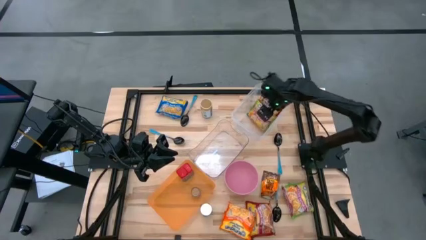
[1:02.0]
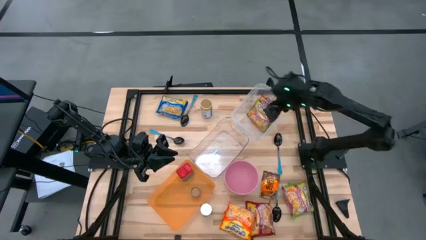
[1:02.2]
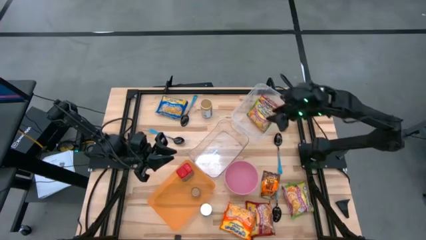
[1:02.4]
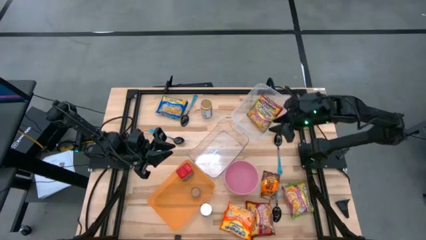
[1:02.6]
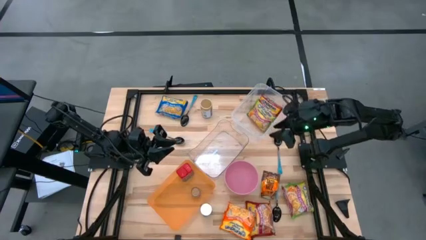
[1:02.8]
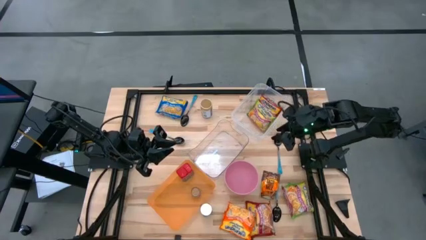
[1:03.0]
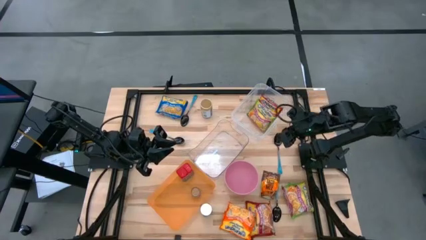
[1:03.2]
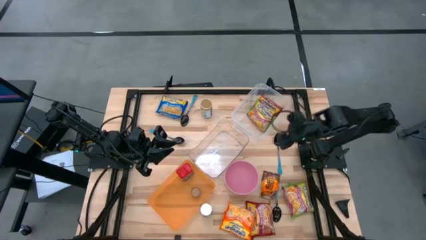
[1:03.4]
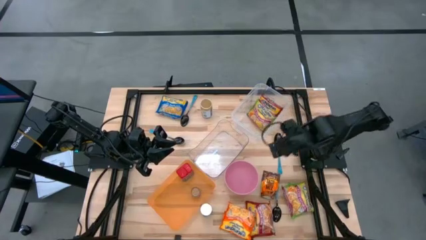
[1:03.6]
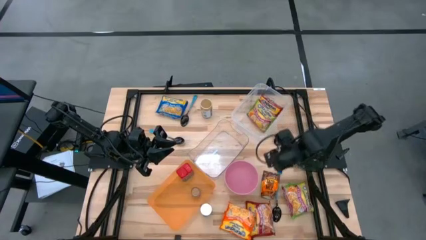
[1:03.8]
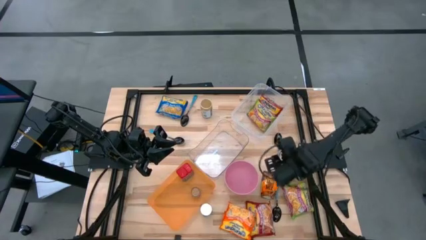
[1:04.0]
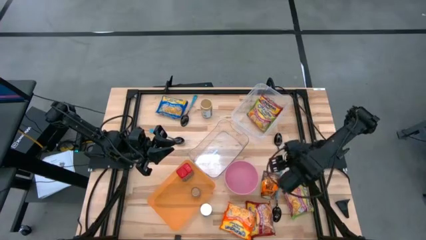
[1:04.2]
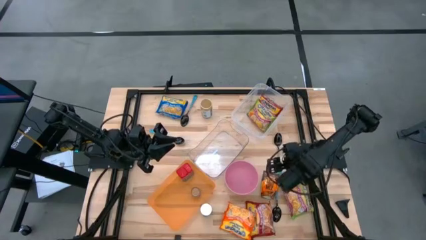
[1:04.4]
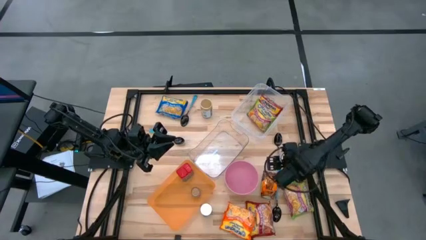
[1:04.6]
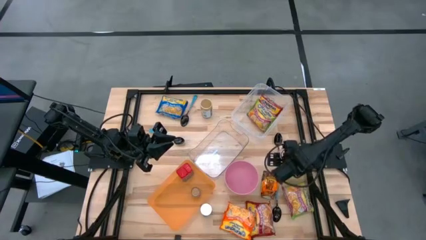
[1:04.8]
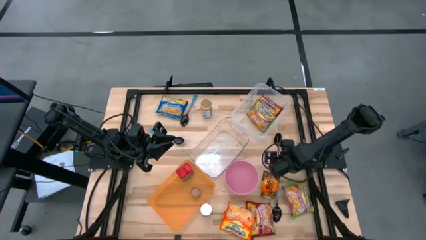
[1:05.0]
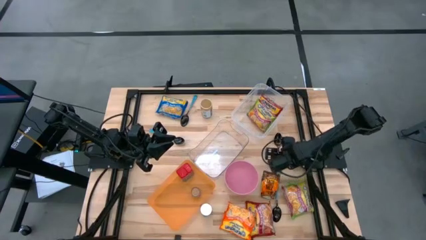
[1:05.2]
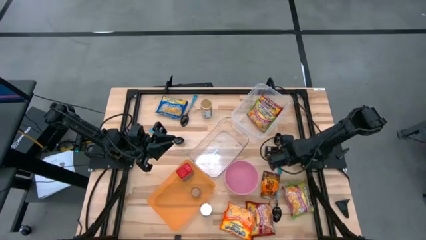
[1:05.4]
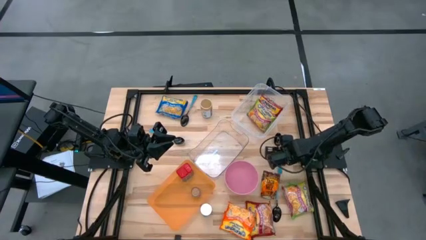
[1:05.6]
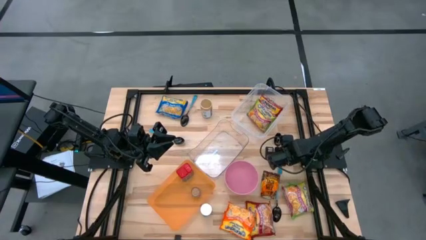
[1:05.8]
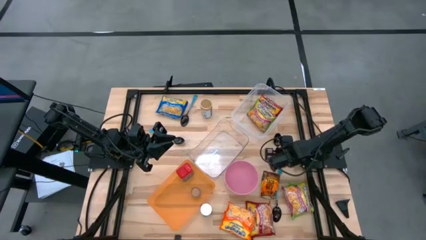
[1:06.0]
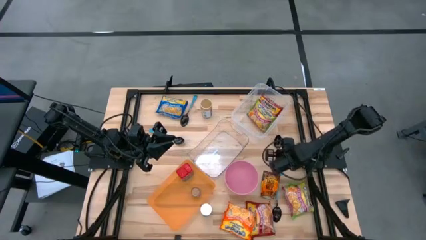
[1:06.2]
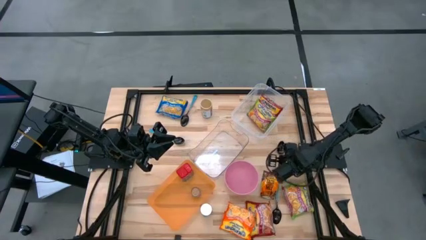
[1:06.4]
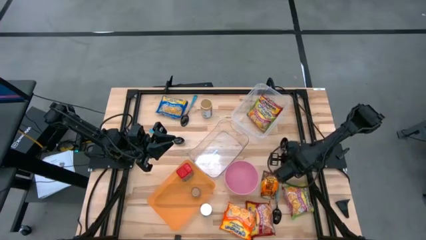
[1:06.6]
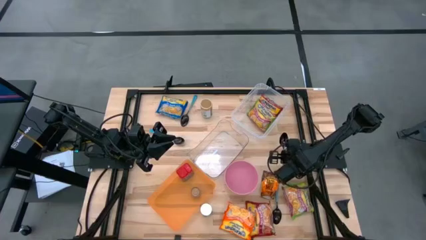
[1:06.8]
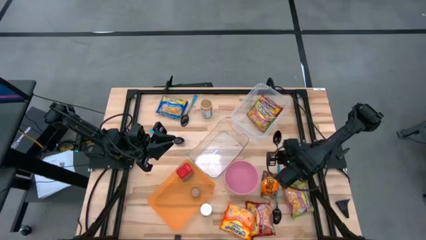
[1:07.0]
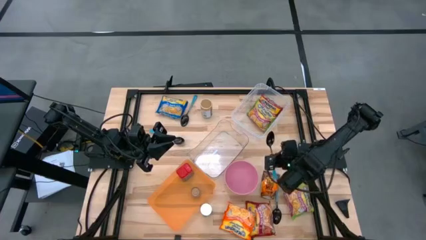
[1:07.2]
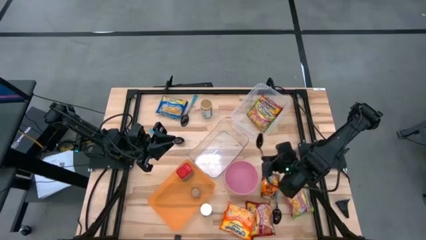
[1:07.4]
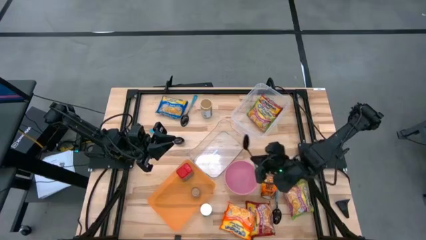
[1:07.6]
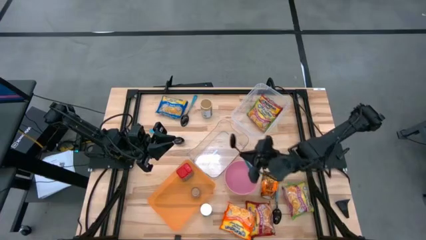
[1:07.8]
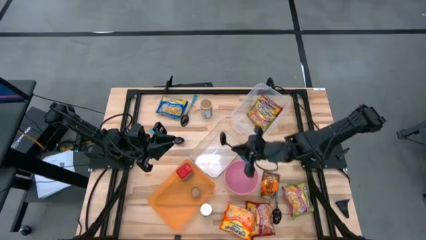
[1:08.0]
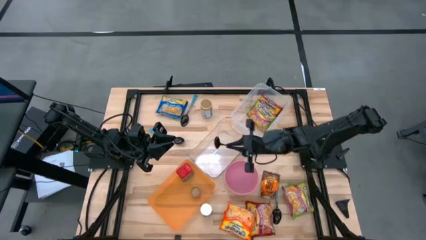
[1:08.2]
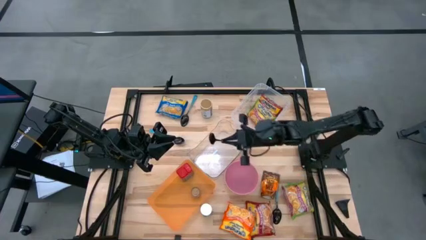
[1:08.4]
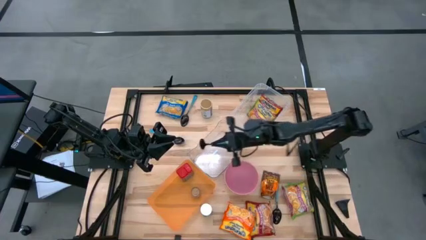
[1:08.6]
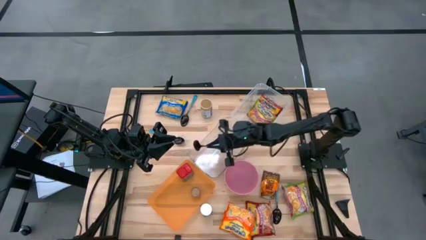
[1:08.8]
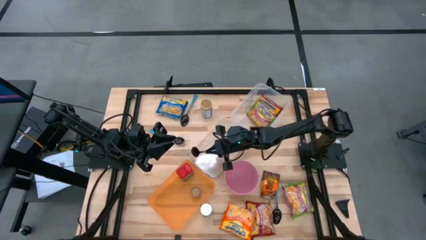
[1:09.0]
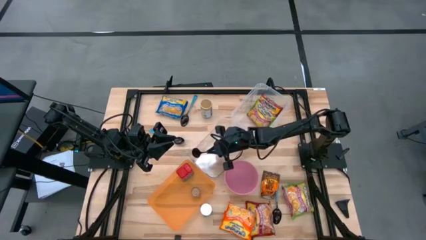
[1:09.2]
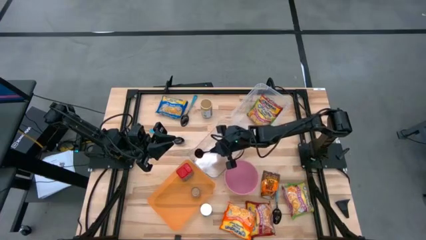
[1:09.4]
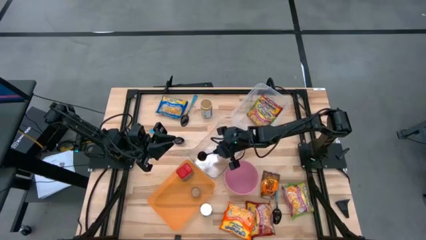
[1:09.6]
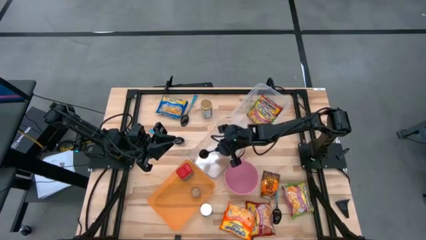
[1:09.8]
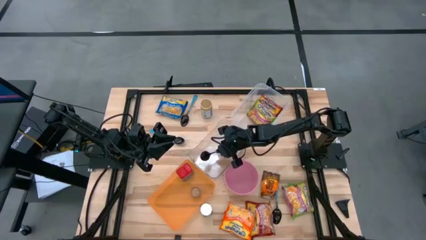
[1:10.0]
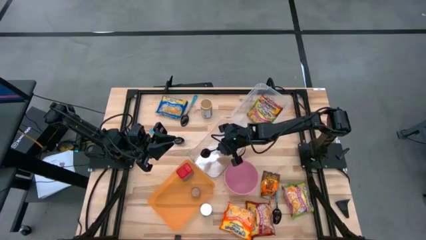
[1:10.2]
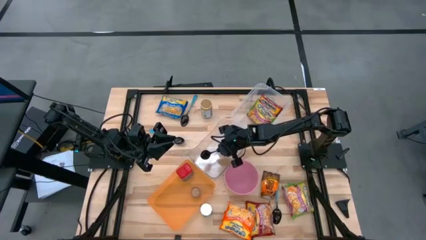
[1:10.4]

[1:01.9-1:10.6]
Task: Pick & Place Food Item
Put the blue spoon into the transparent bin

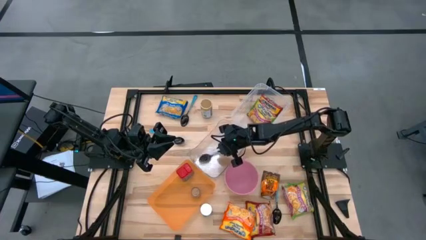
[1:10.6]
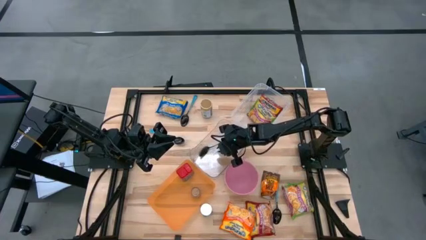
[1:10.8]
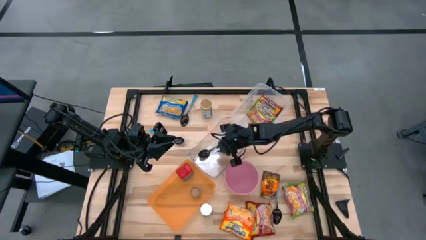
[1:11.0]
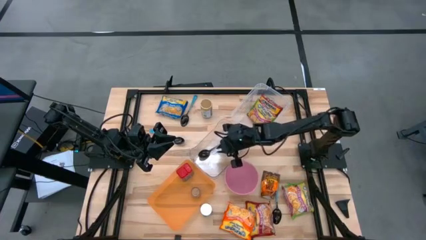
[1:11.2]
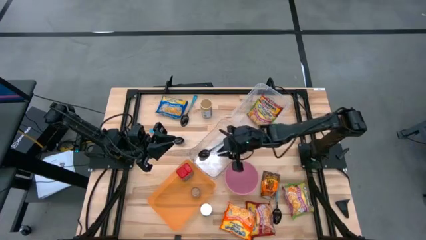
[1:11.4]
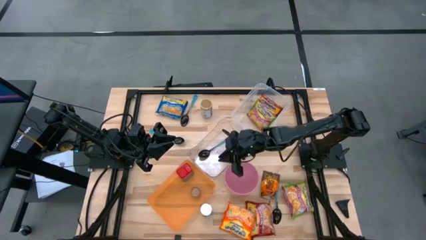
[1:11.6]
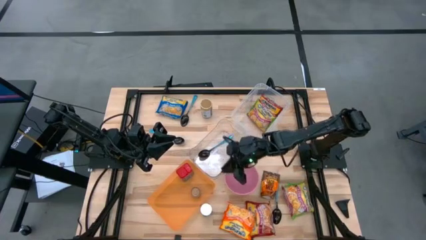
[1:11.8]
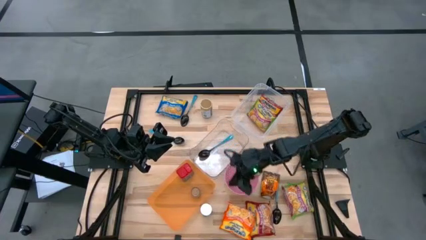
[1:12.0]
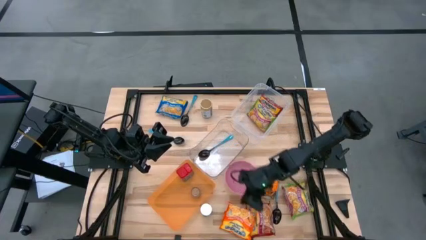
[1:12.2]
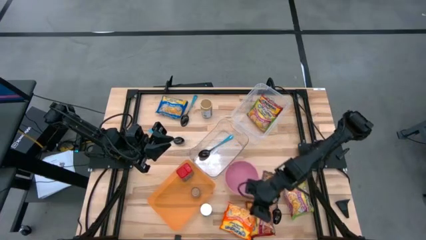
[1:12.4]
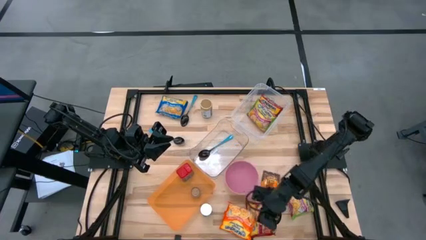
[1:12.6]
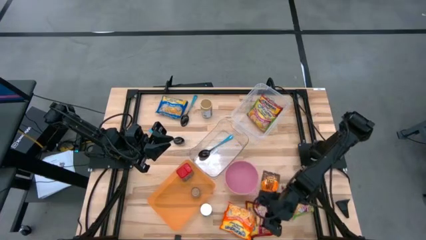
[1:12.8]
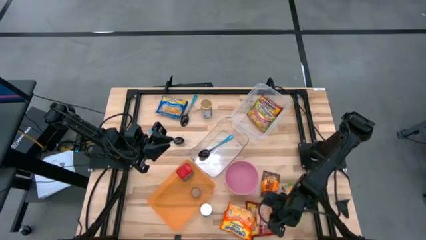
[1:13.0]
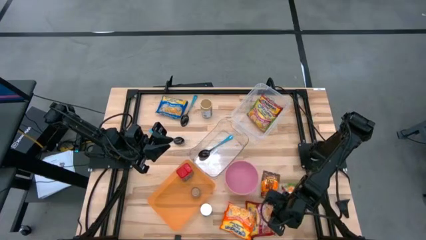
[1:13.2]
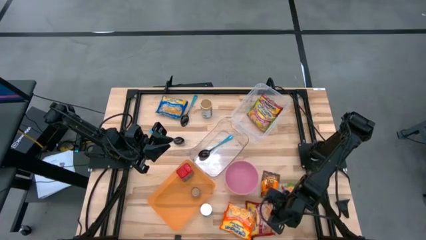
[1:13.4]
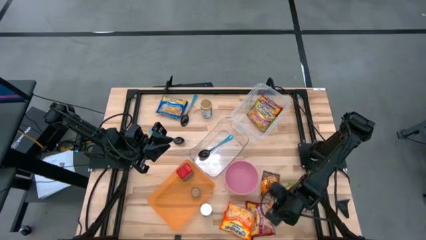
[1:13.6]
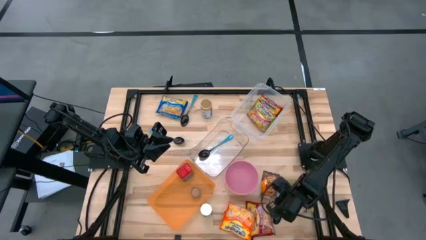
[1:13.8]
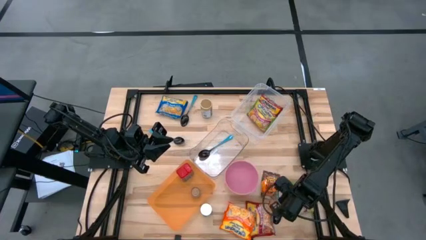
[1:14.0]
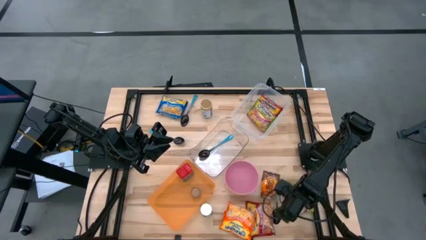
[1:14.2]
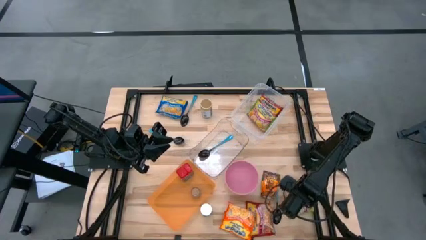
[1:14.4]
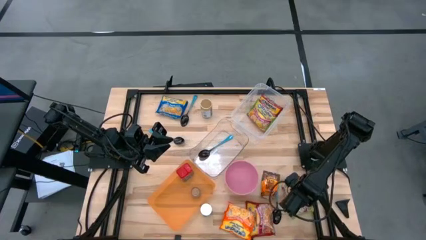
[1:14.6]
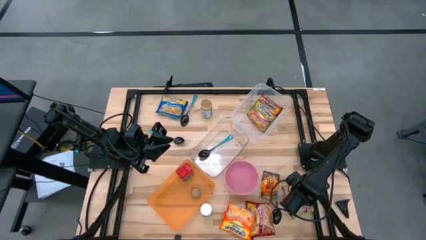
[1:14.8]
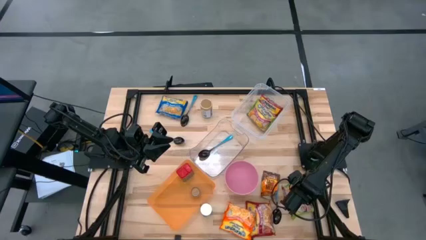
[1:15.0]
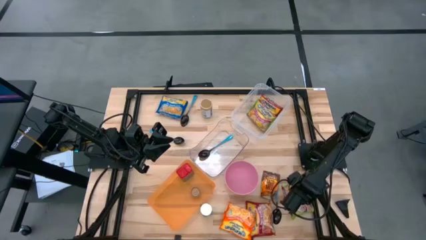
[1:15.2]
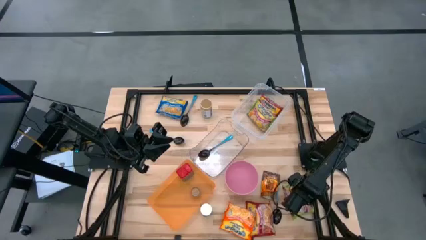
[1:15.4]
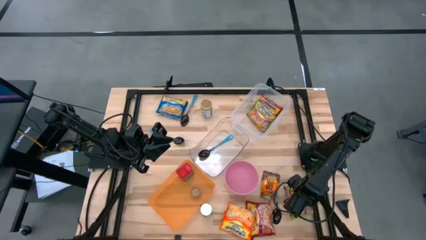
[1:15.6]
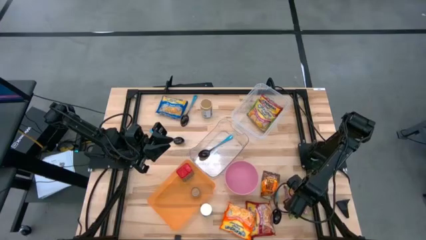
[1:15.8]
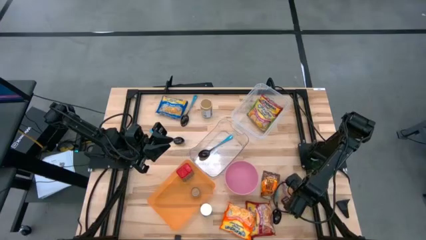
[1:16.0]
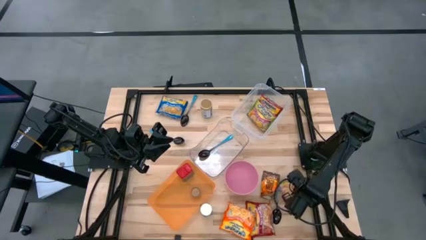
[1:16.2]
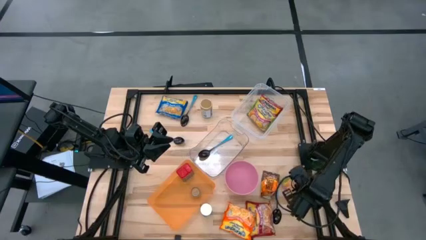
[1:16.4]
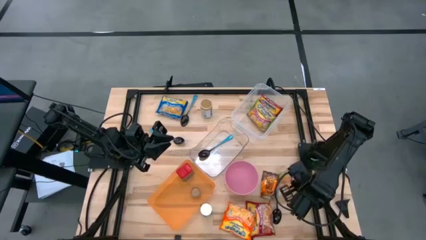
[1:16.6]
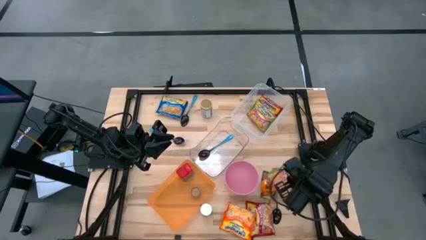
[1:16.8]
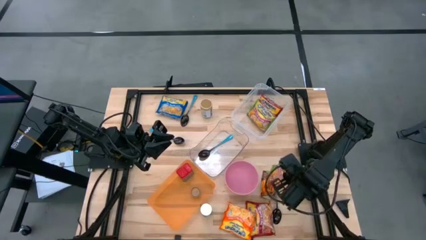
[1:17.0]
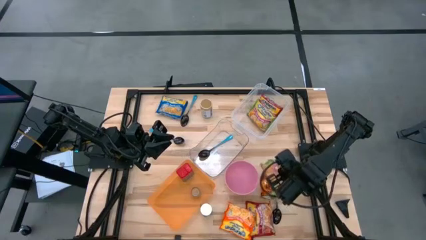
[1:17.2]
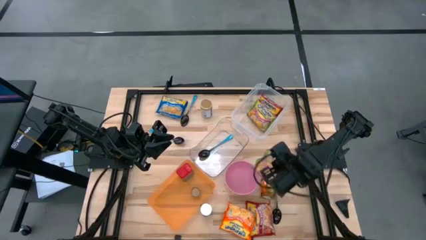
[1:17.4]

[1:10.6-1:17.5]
Put the green noodle pack into the transparent container
